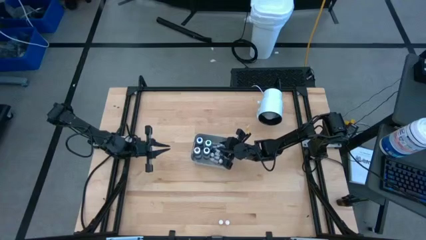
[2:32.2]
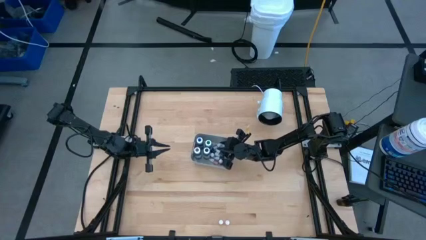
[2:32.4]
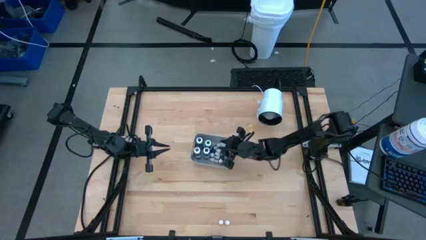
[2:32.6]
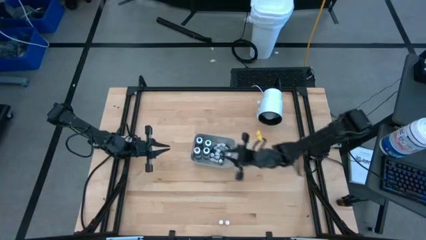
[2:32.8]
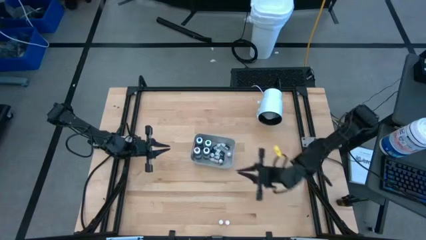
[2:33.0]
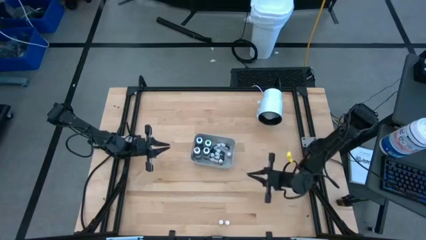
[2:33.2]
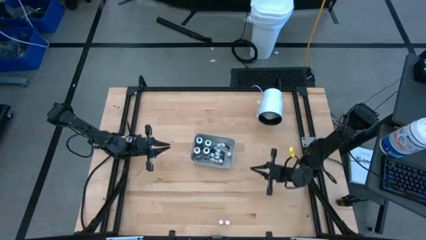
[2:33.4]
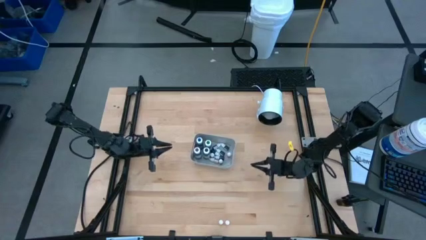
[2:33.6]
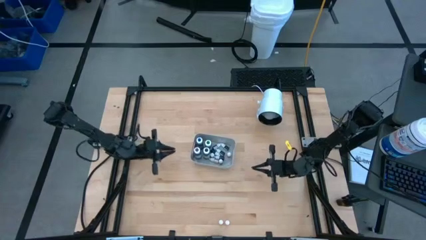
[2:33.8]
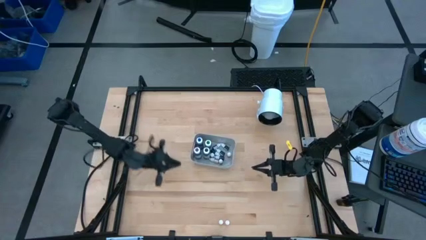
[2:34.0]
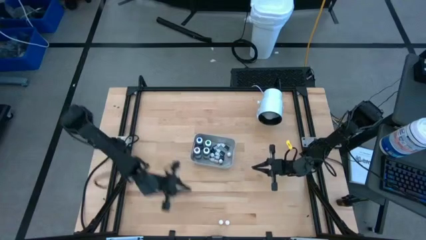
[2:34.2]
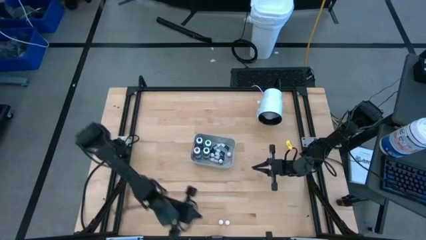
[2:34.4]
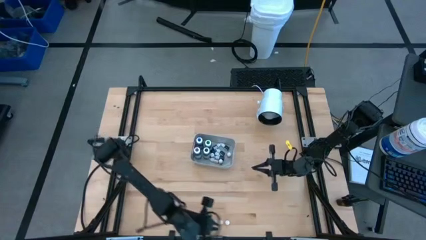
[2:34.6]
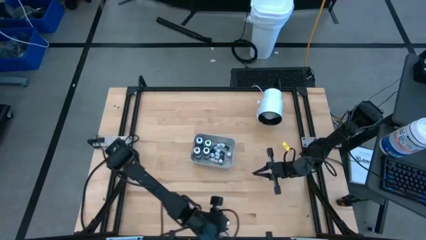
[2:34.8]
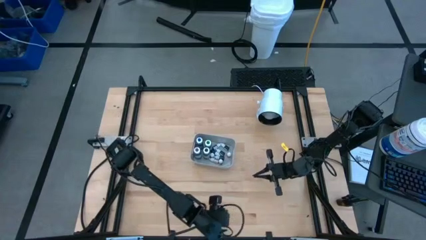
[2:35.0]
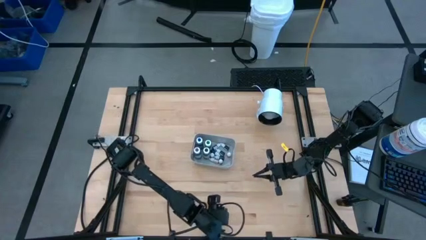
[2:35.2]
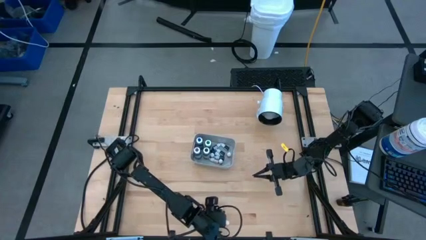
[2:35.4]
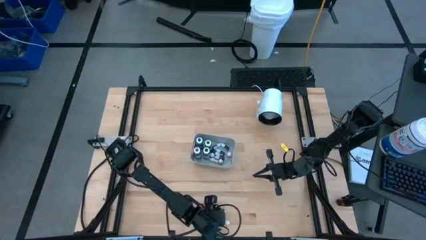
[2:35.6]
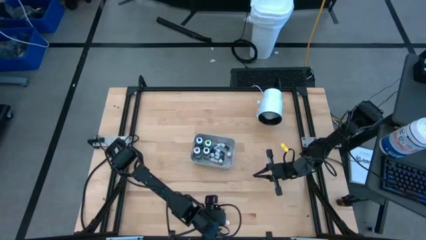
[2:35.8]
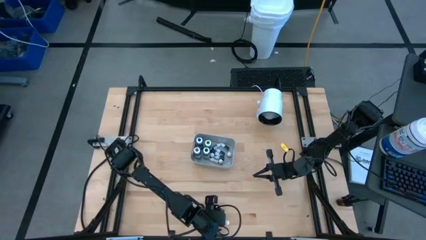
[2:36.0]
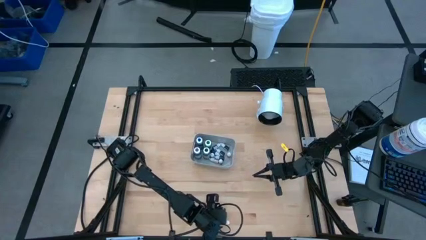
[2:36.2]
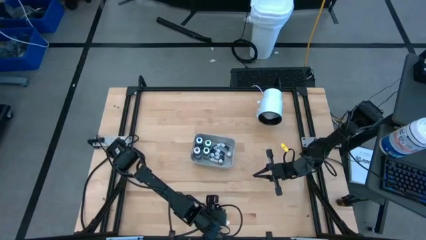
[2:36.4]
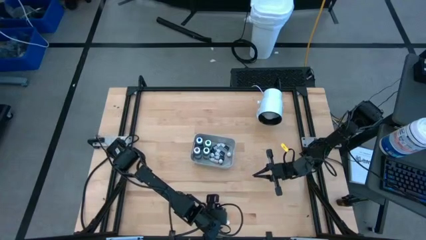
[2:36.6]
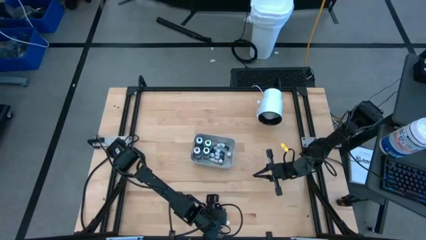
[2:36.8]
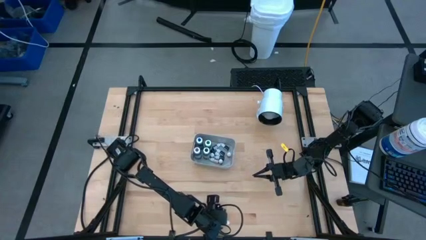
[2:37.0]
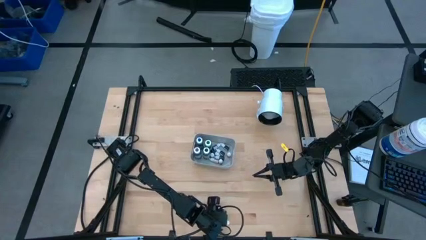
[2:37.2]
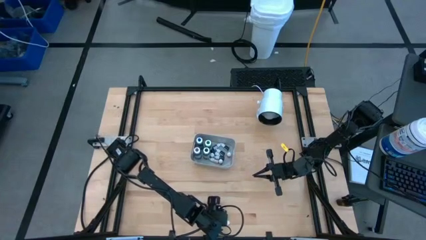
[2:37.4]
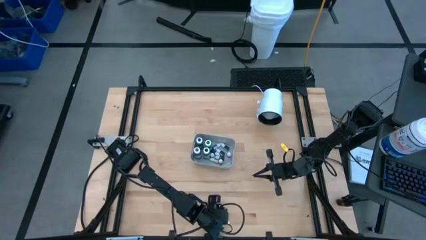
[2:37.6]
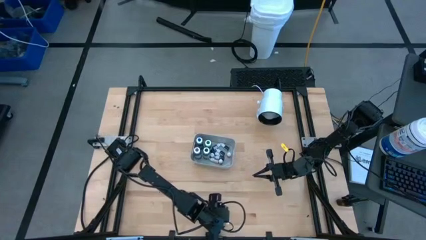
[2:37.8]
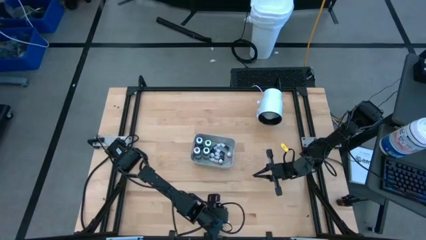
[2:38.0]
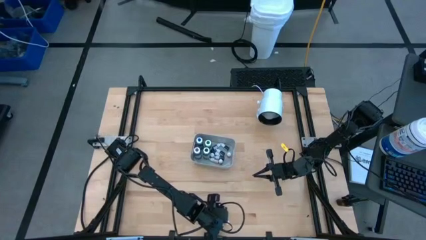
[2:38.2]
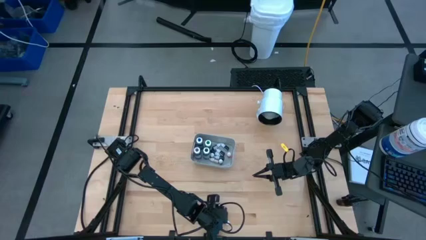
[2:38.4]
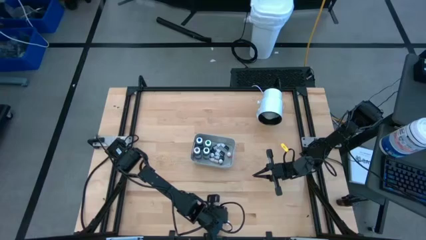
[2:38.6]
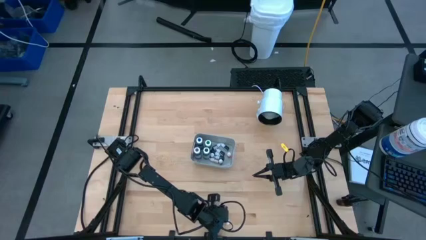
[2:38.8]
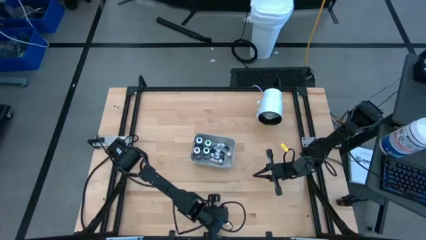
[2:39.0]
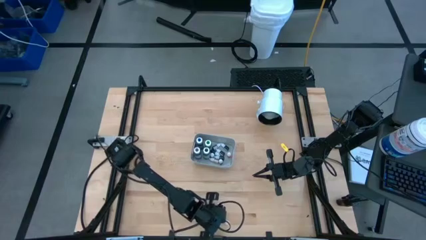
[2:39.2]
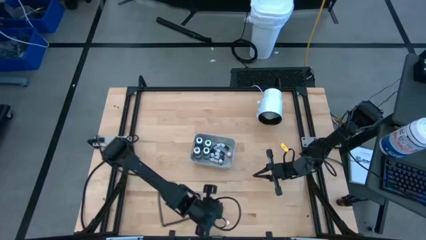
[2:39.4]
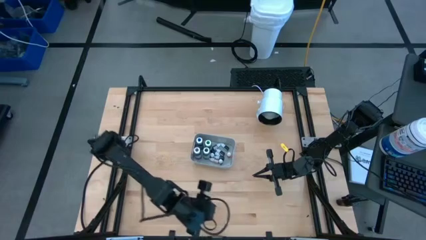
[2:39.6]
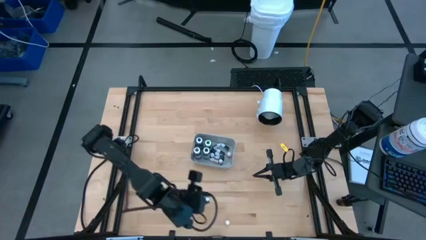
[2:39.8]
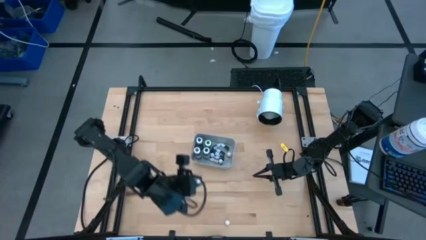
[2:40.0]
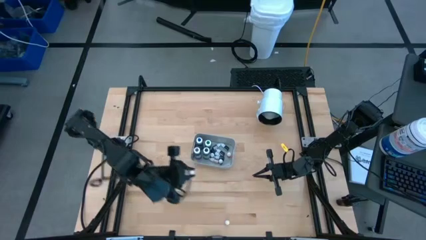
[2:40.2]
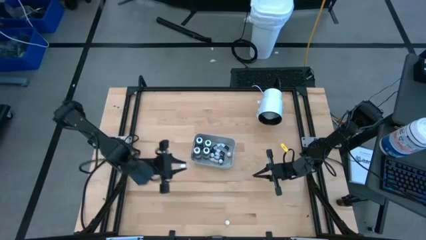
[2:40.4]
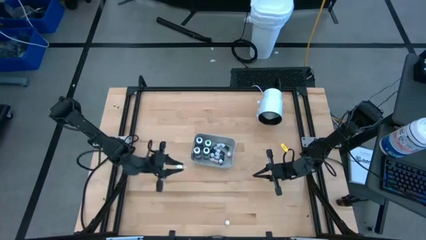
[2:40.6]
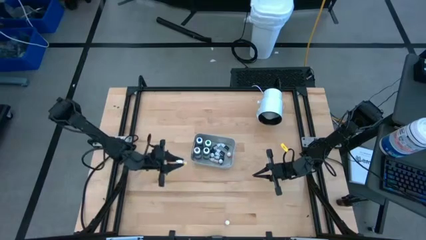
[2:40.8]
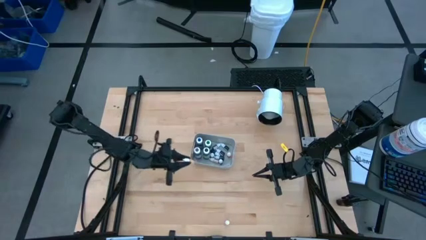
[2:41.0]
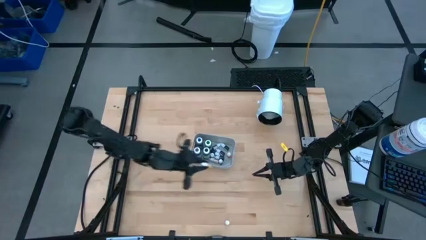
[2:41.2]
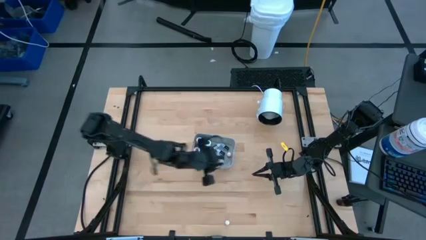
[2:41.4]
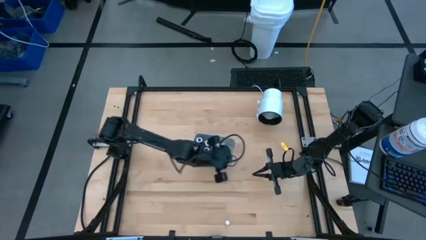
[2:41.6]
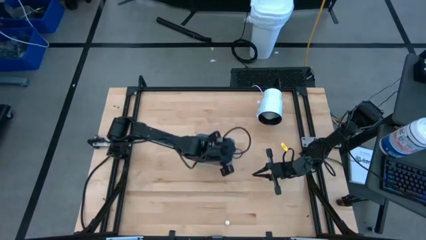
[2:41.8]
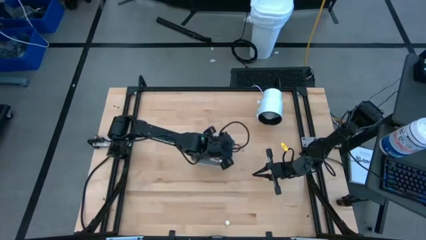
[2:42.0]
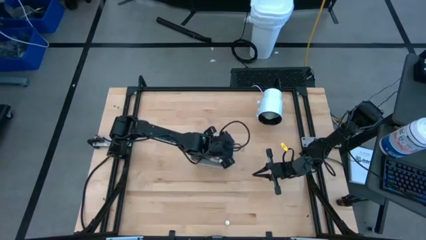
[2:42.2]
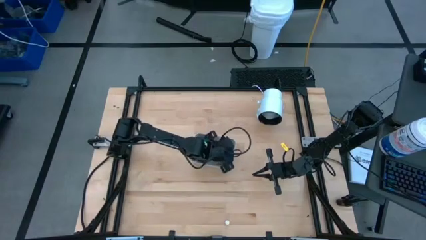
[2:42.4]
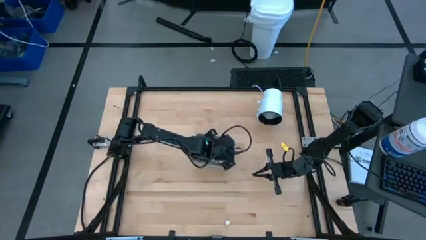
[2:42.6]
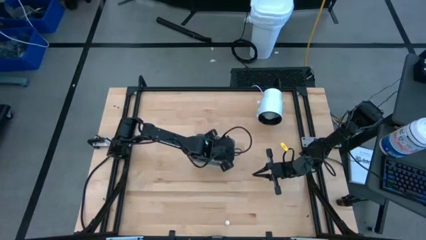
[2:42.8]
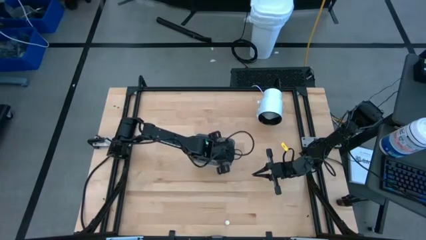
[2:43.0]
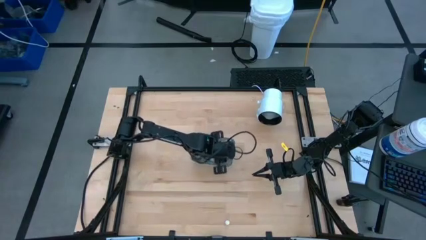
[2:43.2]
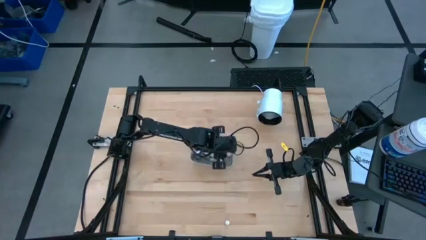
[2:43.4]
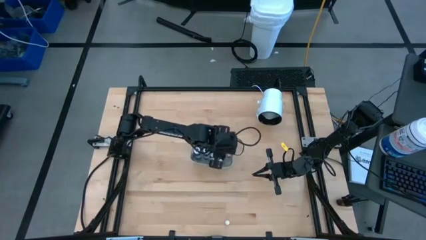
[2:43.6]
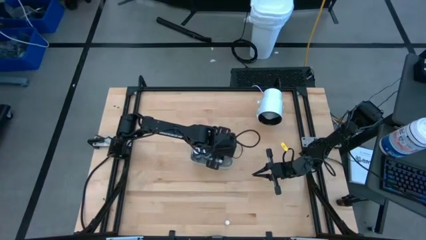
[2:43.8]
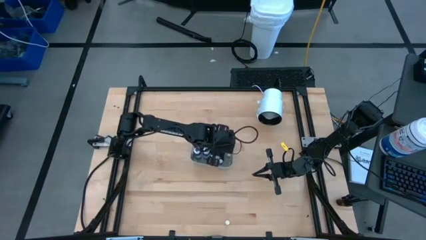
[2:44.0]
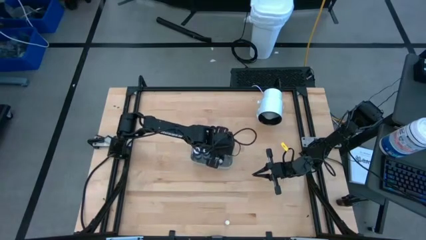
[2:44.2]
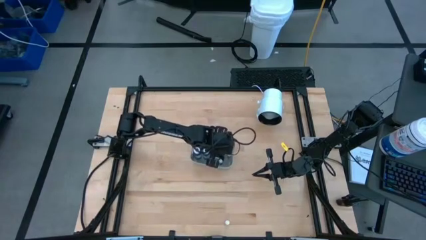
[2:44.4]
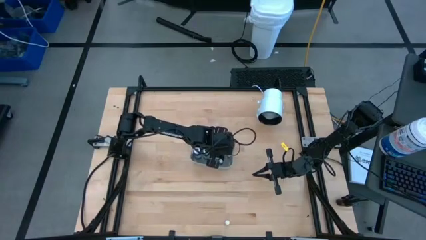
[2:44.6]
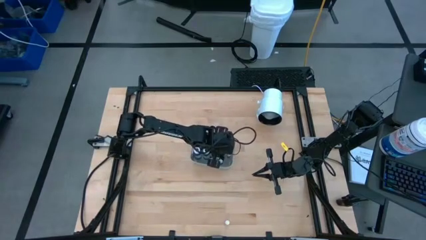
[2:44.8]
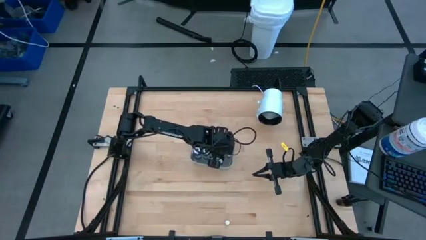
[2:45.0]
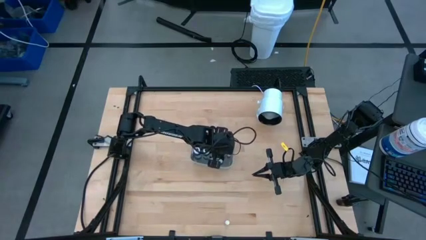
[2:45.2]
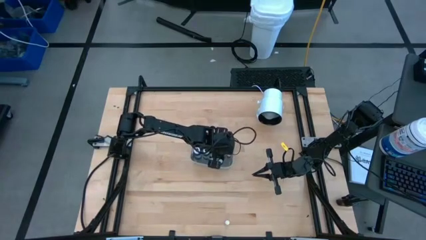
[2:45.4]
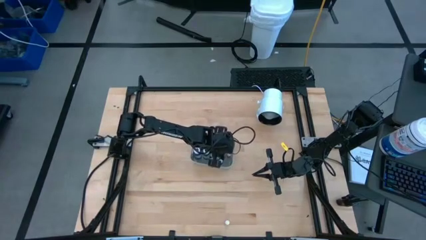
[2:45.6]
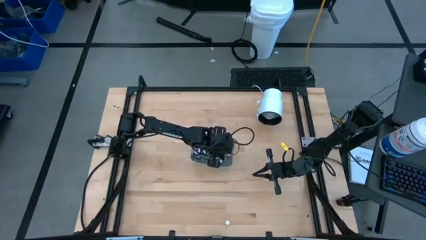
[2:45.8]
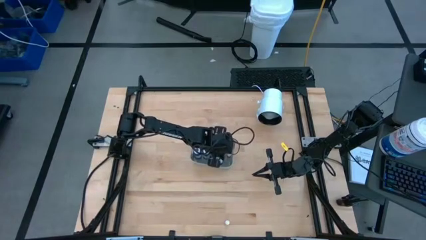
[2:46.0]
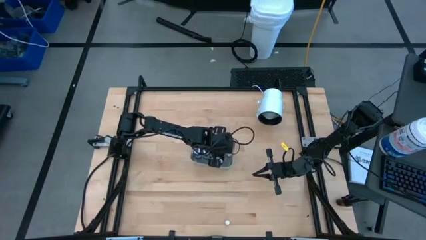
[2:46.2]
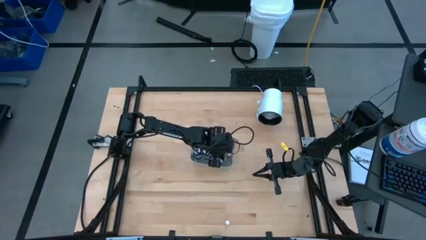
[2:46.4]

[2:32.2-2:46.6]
Task: Pick & Place food coloring
Put the orange food coloring bottle into the gray bin
